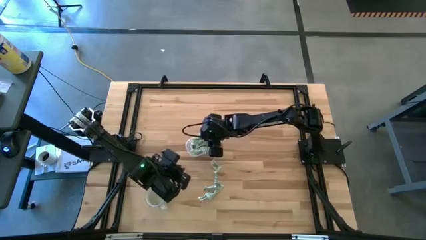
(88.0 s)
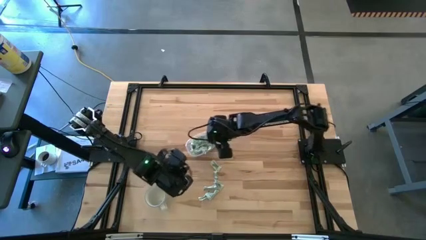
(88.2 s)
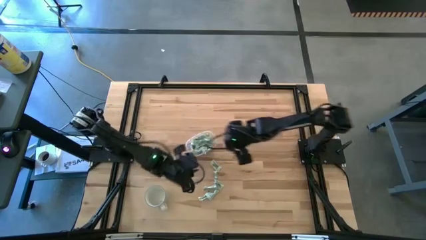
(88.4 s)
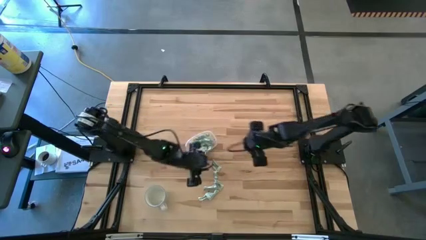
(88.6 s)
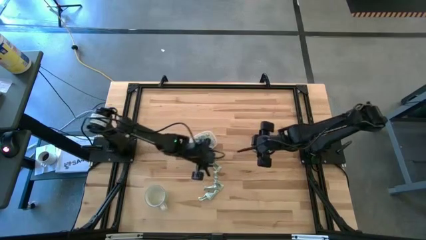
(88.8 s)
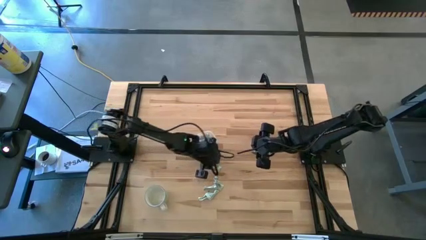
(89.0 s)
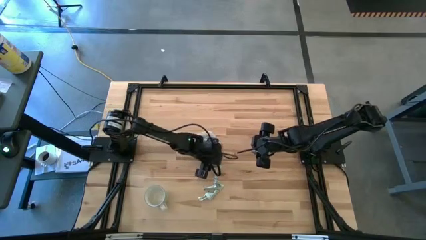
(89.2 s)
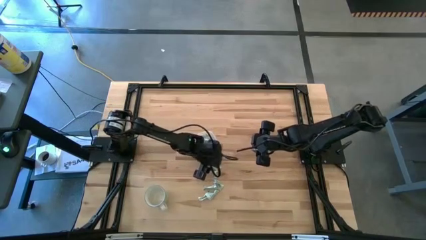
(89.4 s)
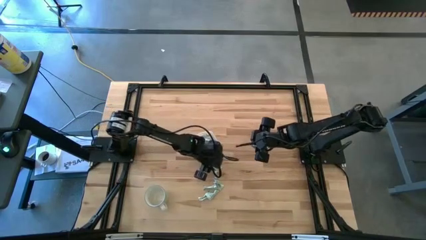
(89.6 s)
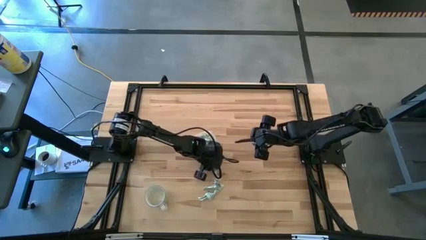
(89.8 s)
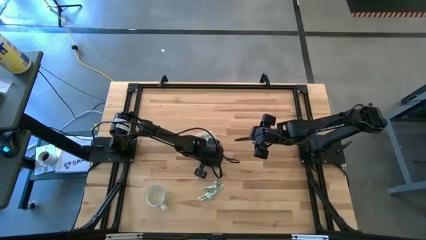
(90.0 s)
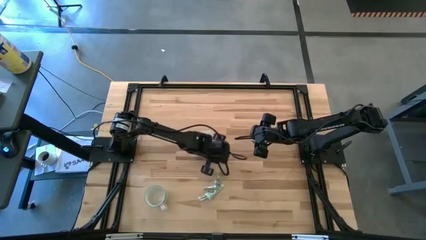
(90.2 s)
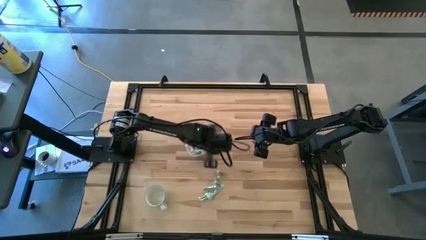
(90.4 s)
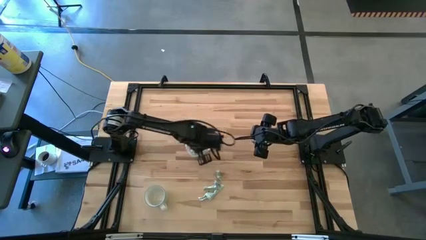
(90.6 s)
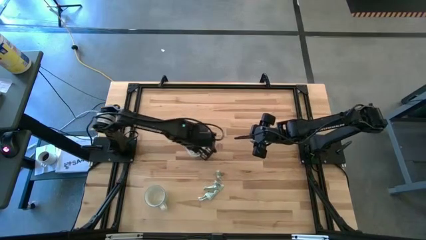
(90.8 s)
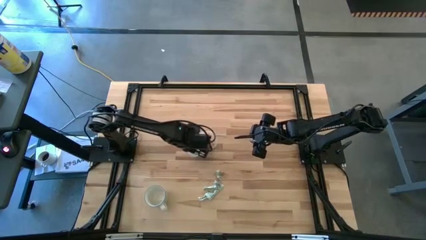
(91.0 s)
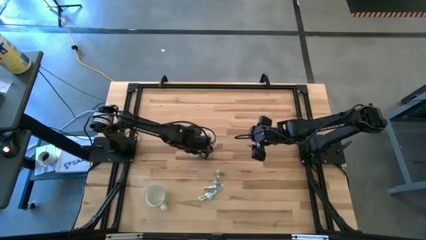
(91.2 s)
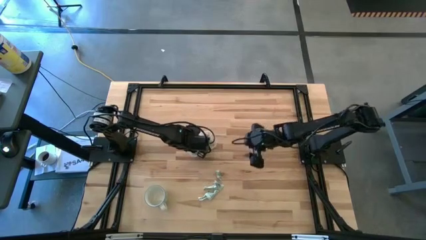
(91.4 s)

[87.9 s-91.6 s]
Task: Pick and place Stevia / Truvia into bins
Put the stevia packet into the transparent container

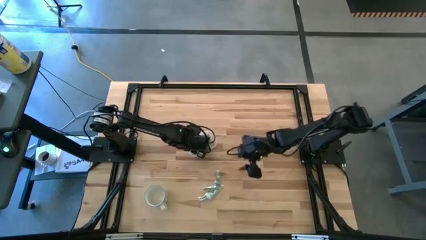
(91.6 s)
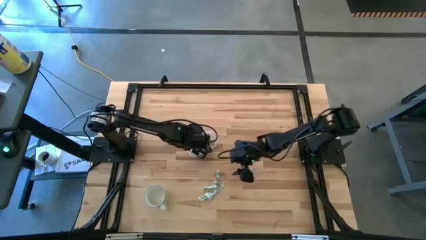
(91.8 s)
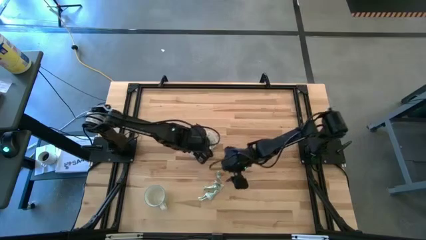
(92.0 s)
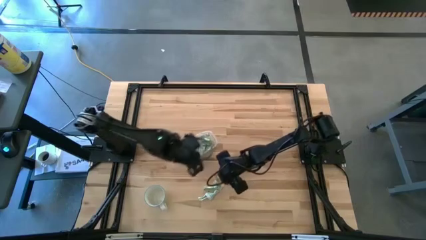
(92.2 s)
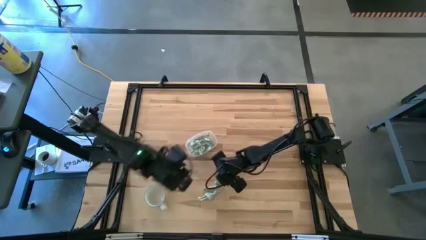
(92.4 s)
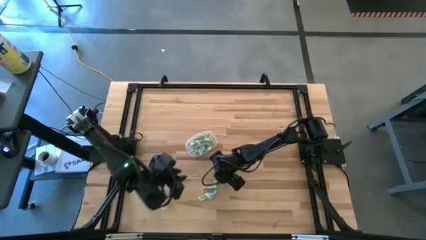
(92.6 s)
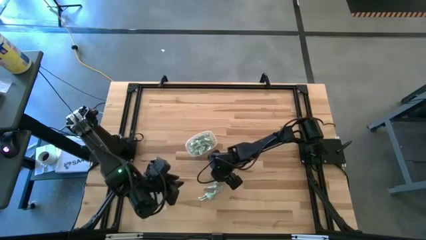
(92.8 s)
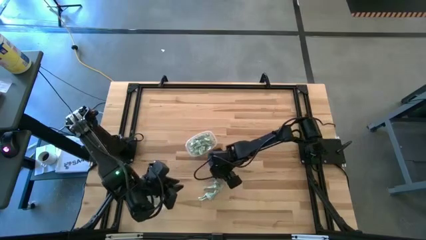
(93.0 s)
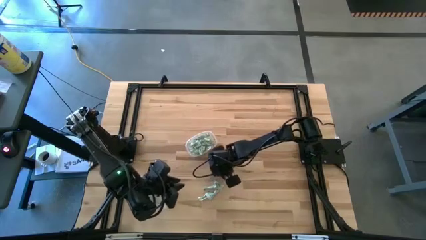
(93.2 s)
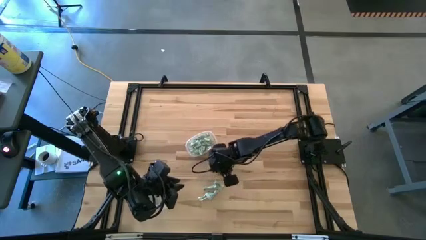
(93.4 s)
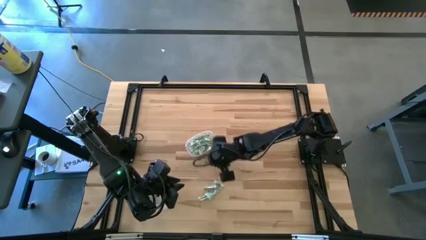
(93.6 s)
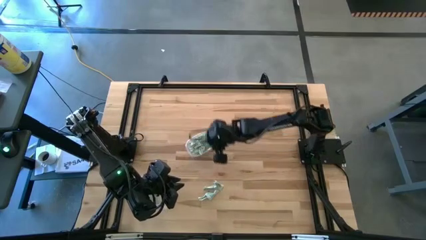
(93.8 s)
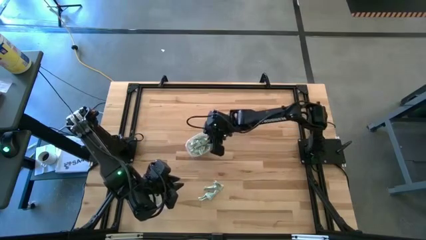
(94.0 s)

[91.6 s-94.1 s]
Put the stevia packet into the transparent container

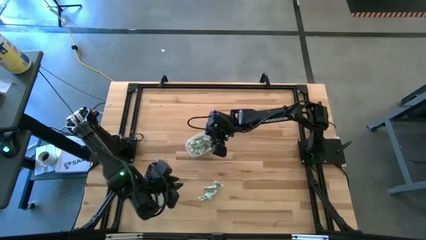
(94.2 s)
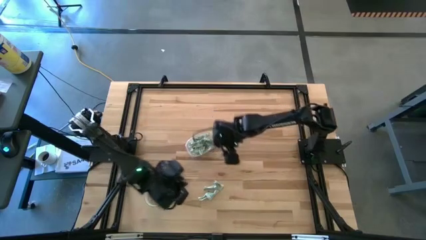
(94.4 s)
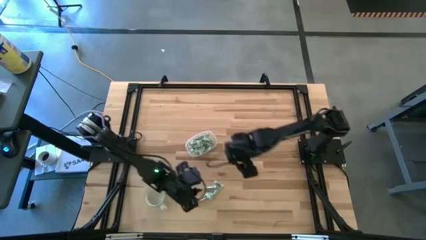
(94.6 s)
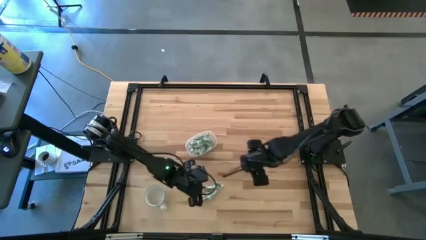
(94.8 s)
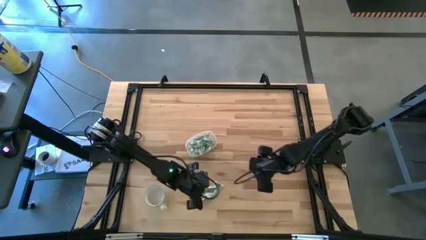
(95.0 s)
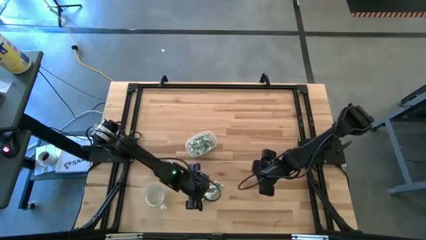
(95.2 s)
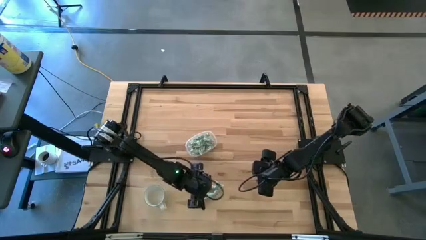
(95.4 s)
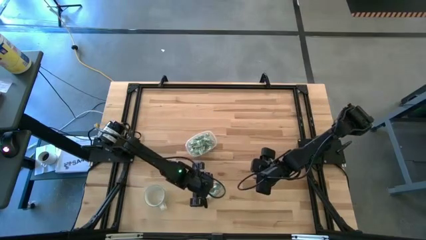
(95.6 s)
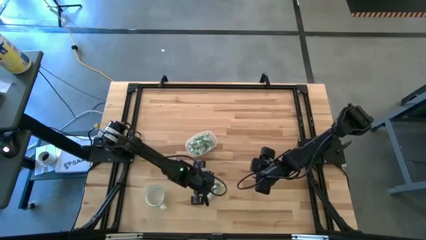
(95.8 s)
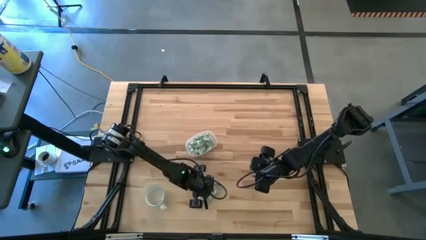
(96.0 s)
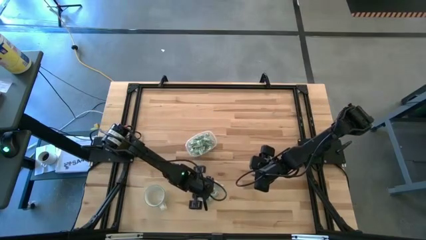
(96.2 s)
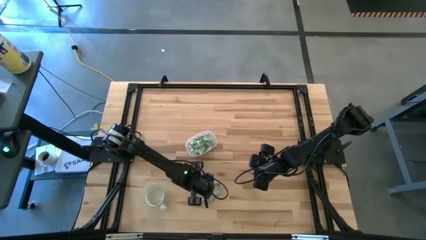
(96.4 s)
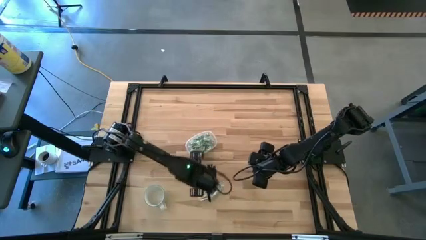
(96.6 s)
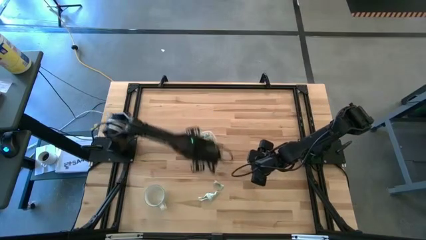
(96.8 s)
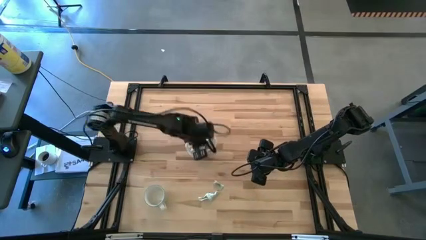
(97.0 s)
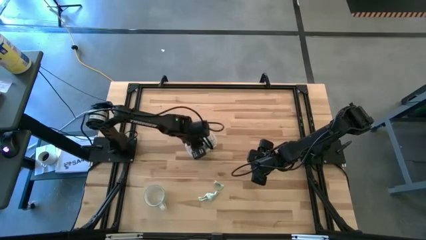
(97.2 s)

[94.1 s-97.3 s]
Put the stevia packet into the transparent container

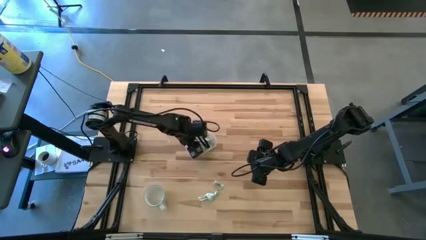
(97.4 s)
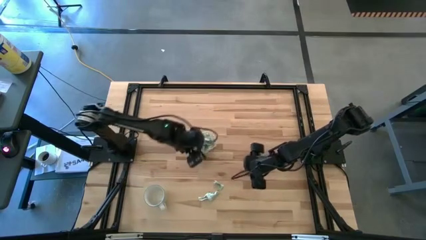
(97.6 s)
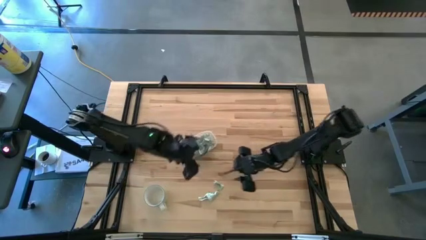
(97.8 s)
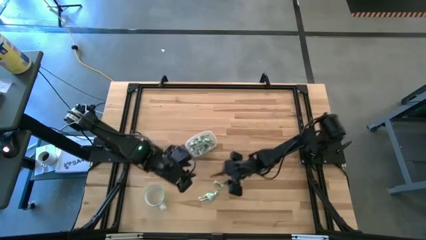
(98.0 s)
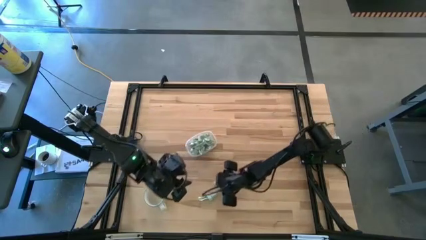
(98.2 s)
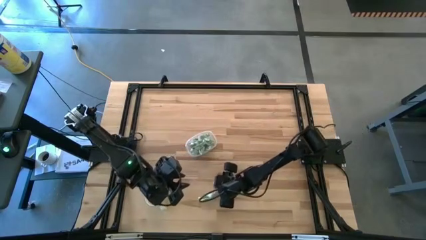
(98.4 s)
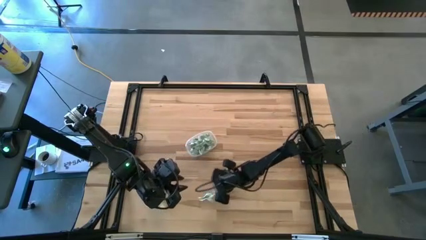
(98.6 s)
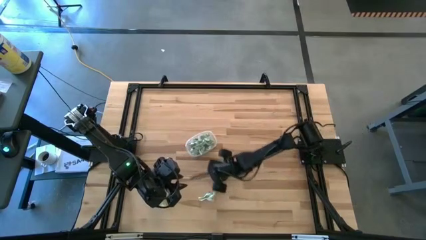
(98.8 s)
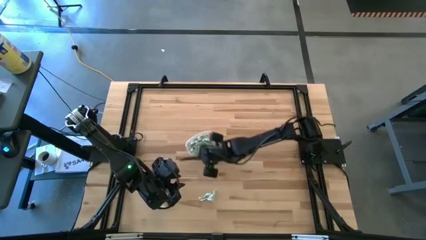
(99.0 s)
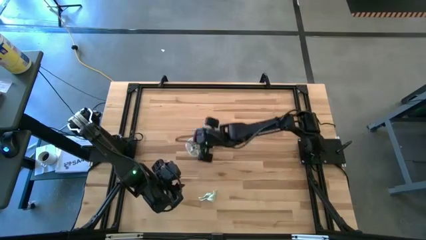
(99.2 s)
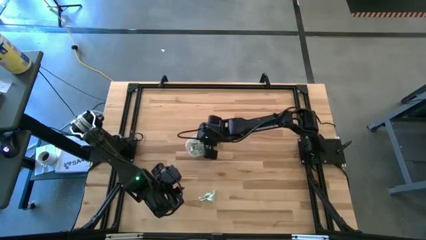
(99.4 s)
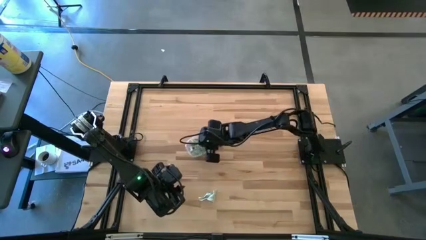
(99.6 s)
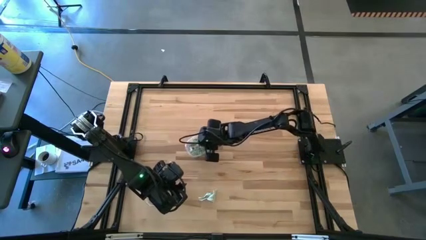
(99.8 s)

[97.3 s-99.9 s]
Put the top stevia packet into the transparent container

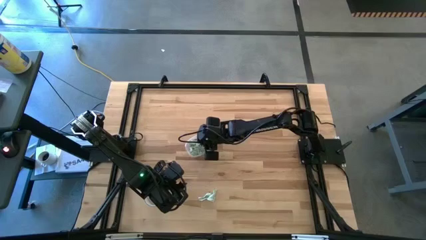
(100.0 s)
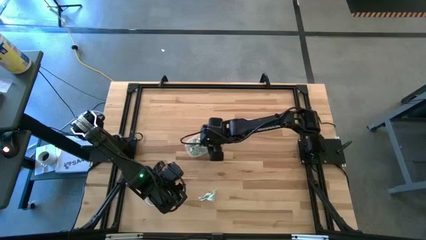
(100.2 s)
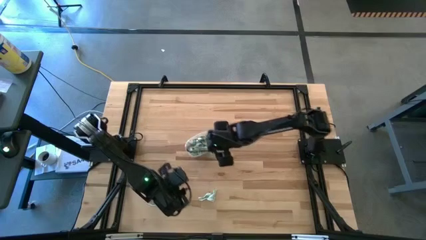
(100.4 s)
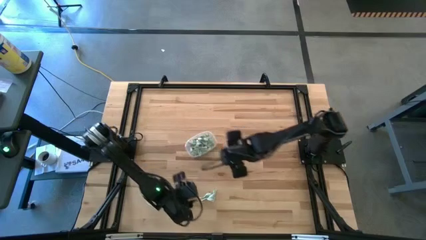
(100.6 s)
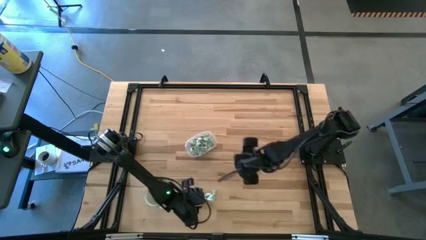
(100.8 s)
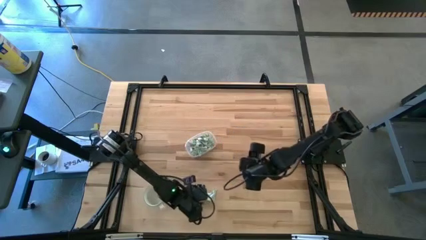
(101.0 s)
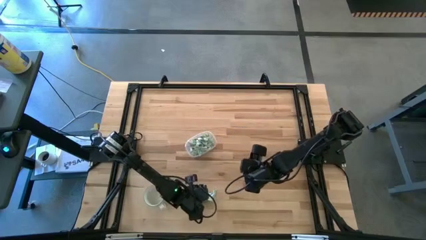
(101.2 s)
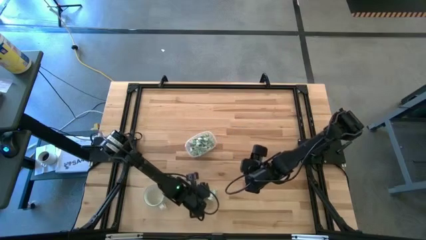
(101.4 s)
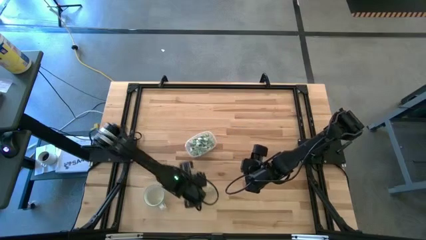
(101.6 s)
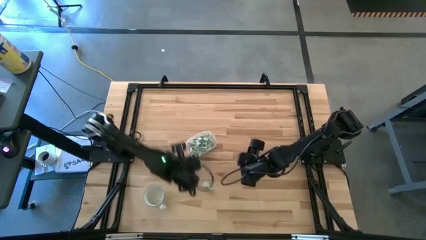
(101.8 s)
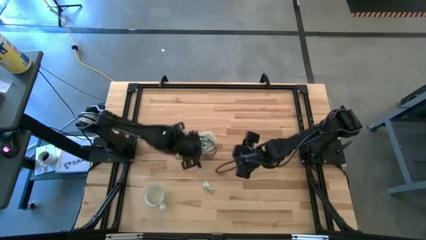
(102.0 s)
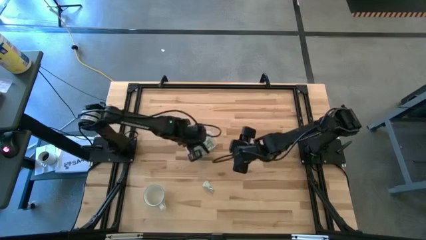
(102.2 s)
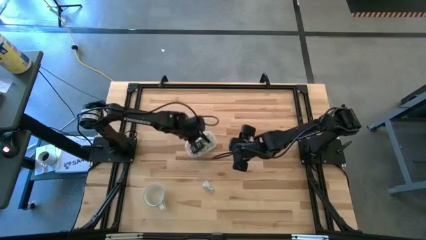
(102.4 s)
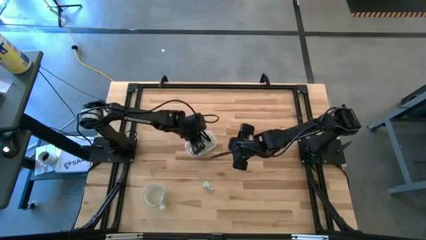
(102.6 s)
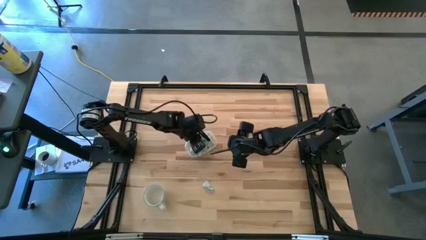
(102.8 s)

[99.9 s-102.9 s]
Put the left stevia packet into the transparent container

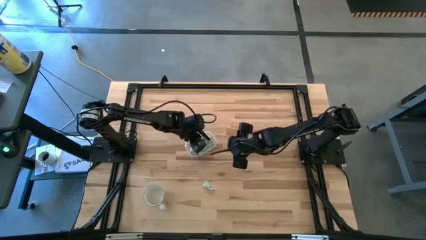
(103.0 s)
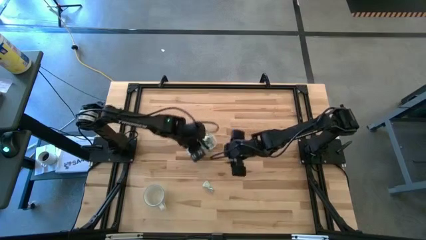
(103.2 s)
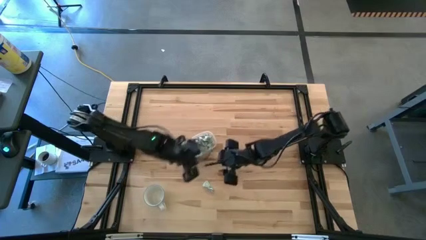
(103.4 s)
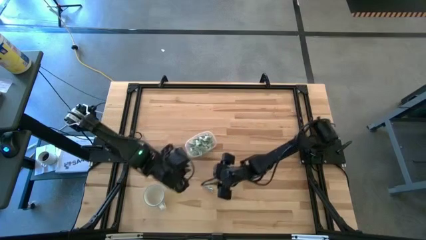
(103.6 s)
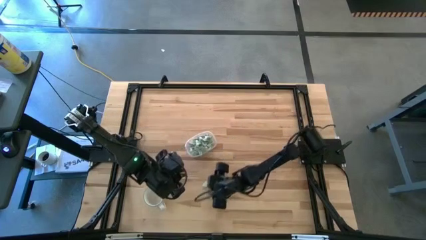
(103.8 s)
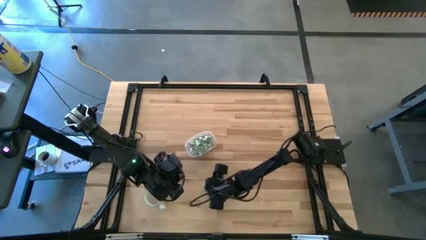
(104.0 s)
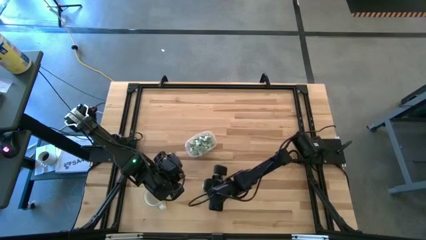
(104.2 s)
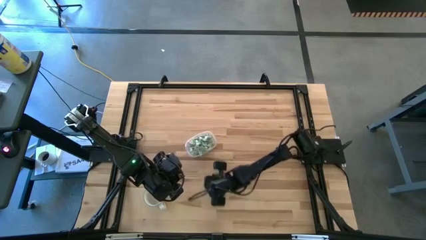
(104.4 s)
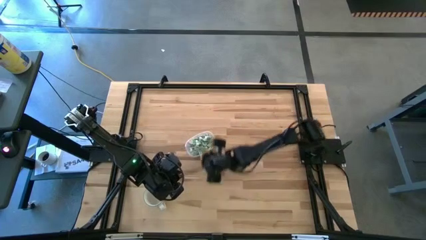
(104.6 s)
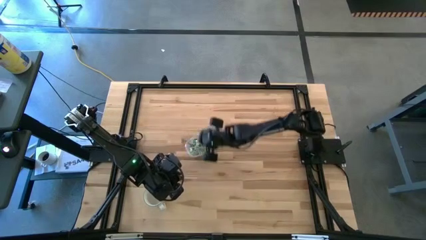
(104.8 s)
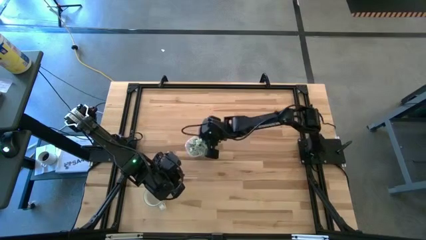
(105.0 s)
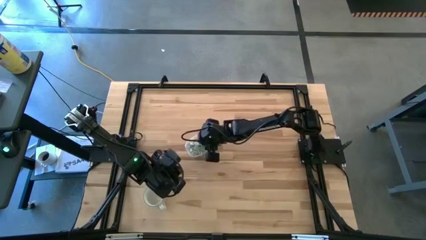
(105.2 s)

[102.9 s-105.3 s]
Put the stevia packet into the transparent container

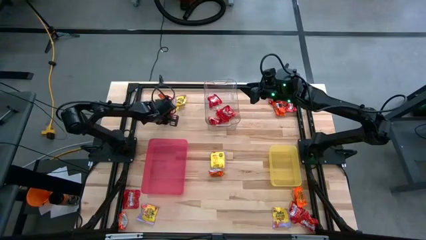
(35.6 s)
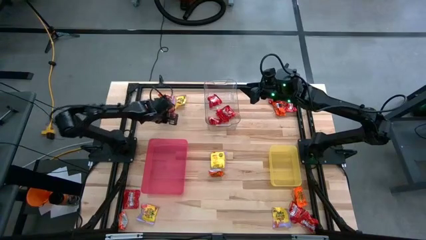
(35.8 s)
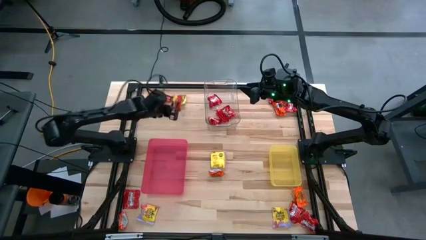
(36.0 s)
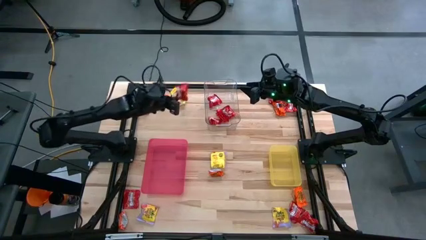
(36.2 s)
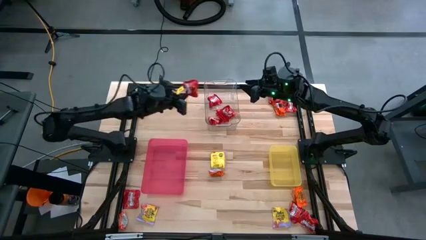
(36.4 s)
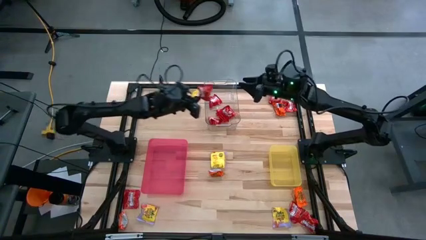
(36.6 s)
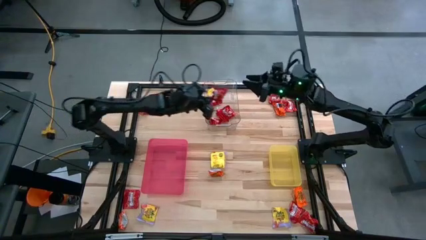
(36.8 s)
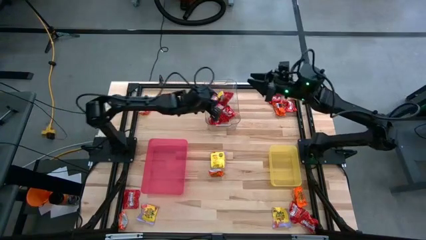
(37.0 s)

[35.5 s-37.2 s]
Task: Sort candy
Put the red candy into the transparent bin
